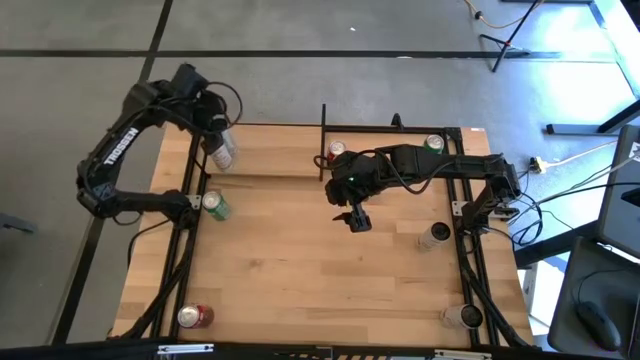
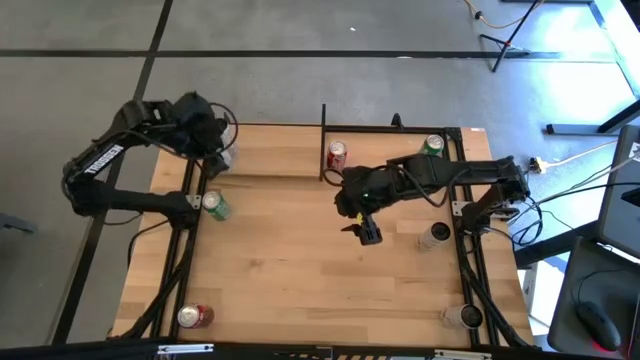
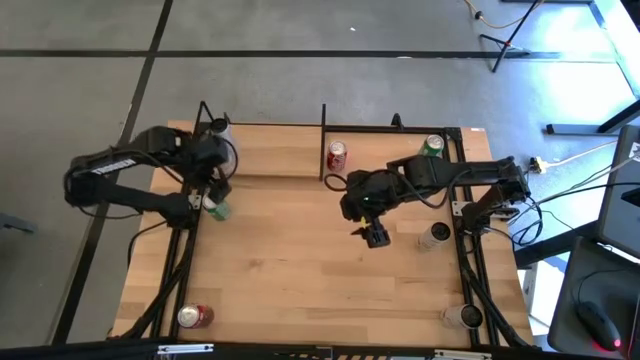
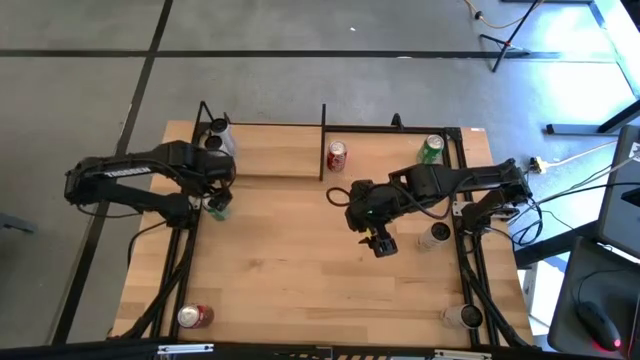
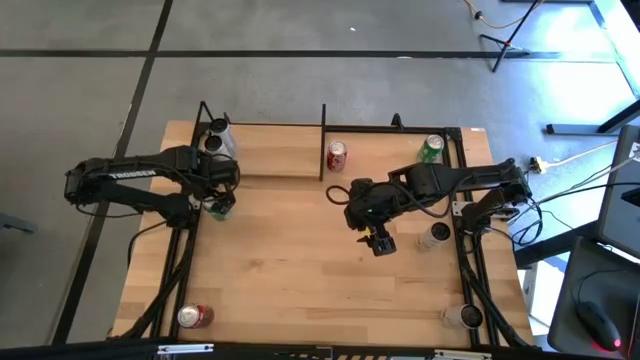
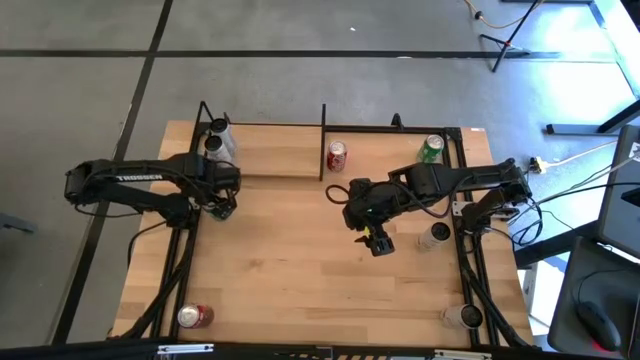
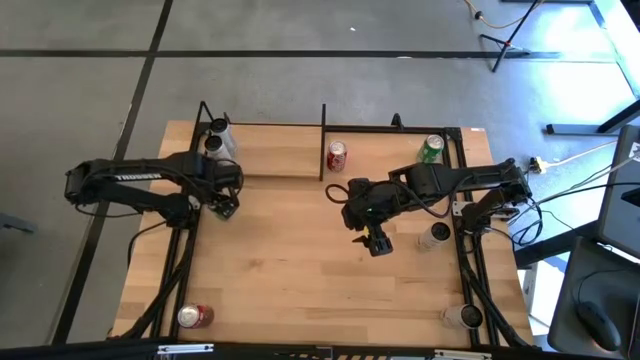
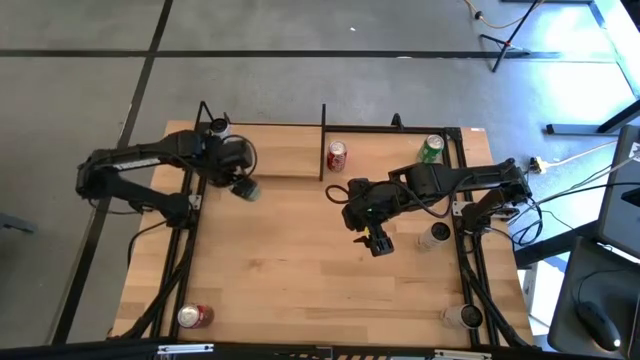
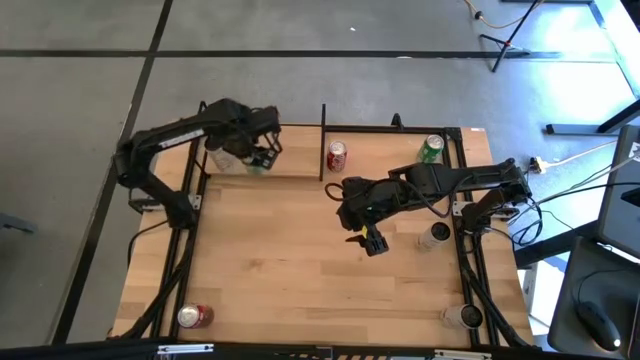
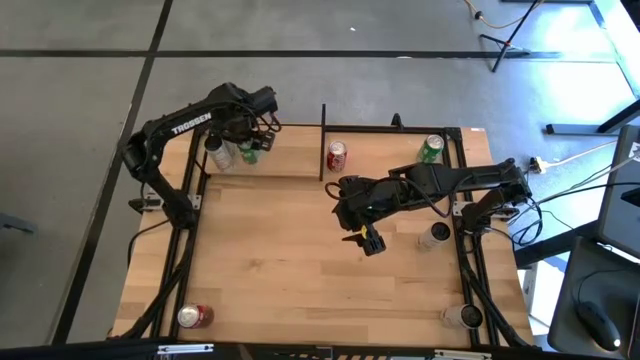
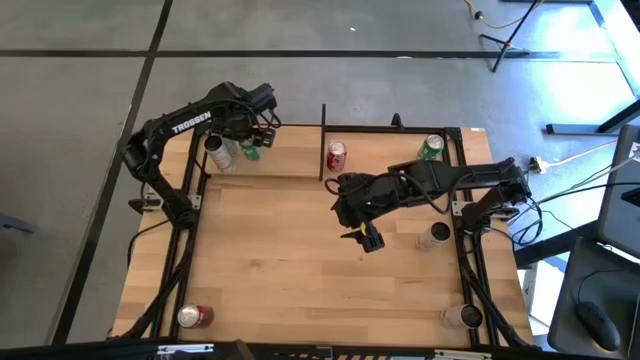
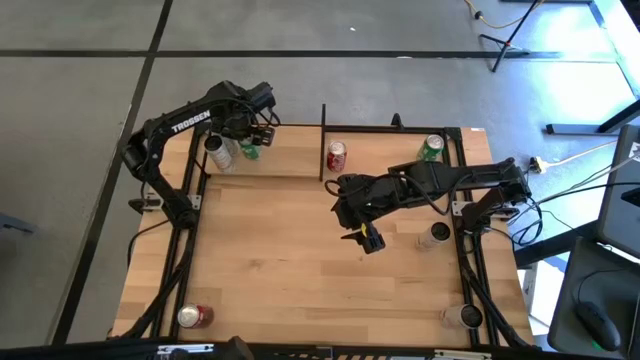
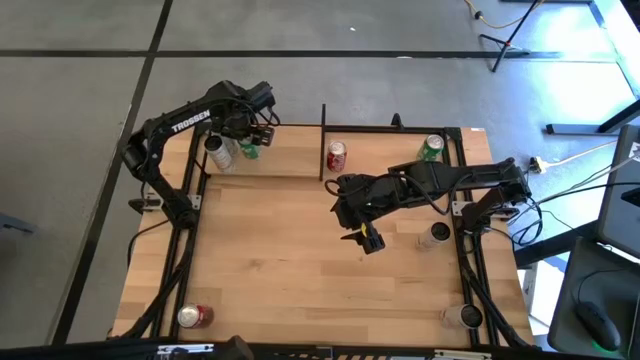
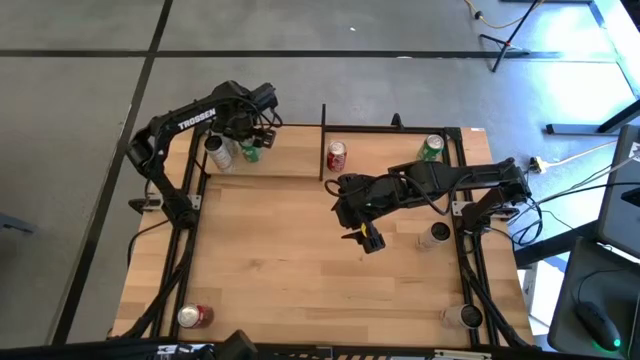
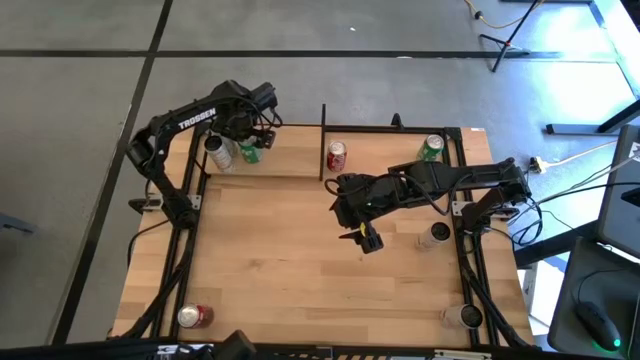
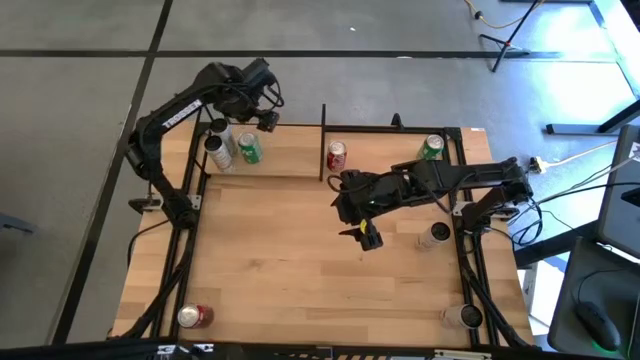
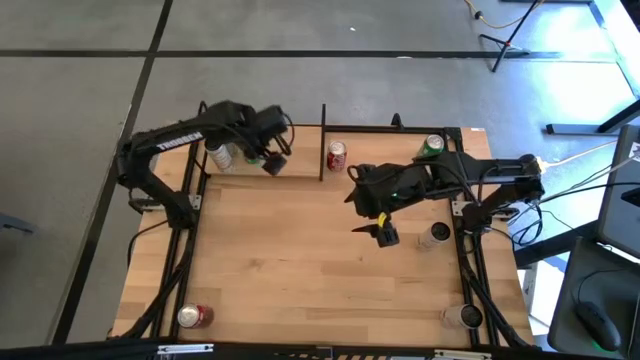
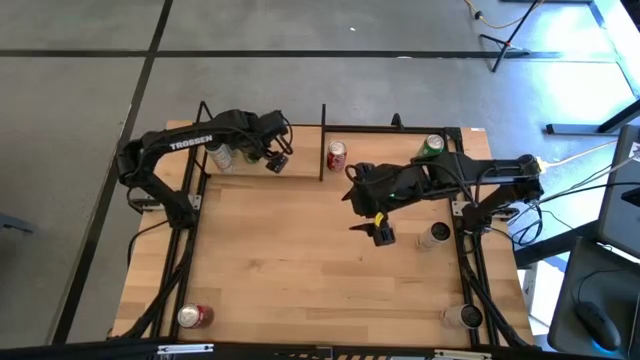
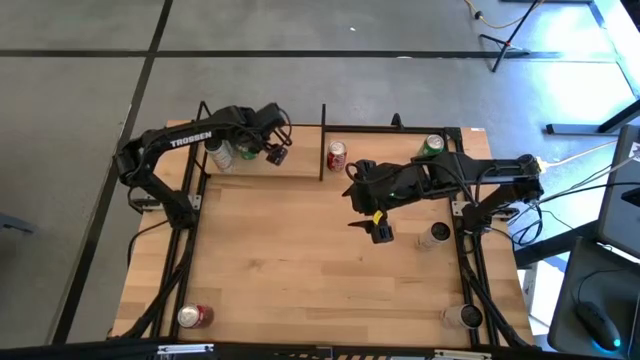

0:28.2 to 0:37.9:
Task: Place canned beverage on shelf
Put the left green soda can on the shelf

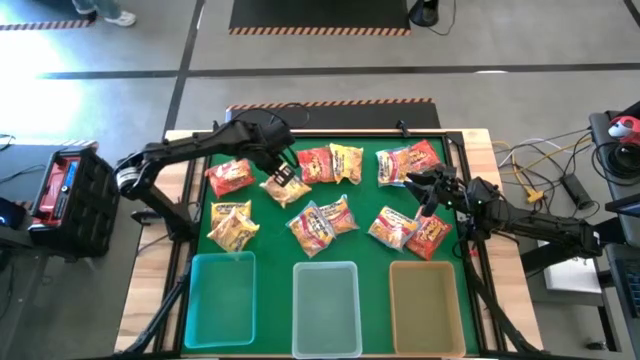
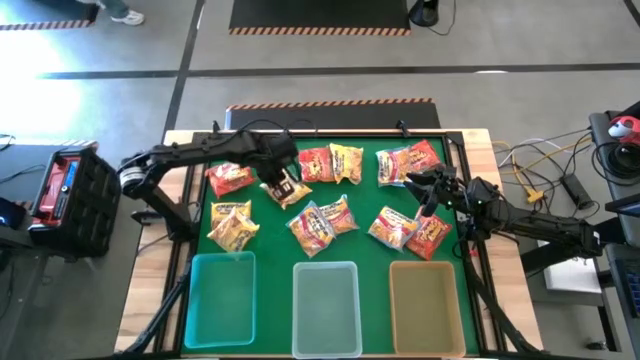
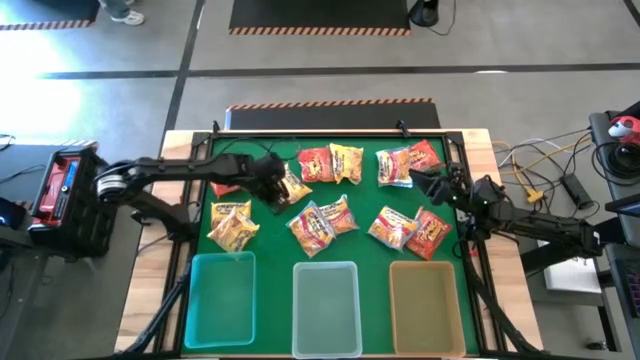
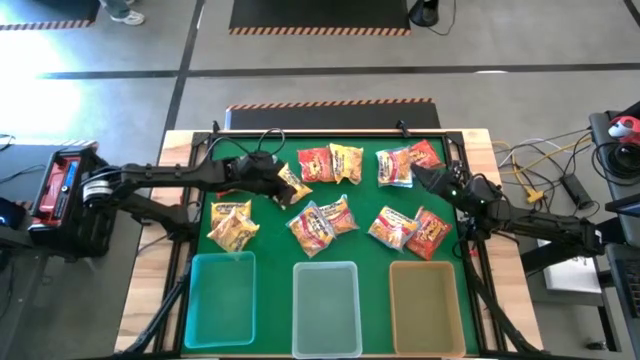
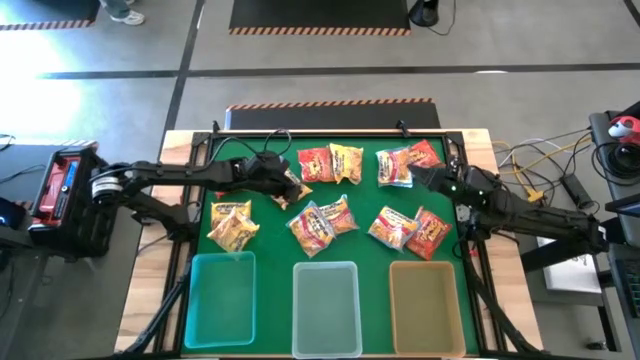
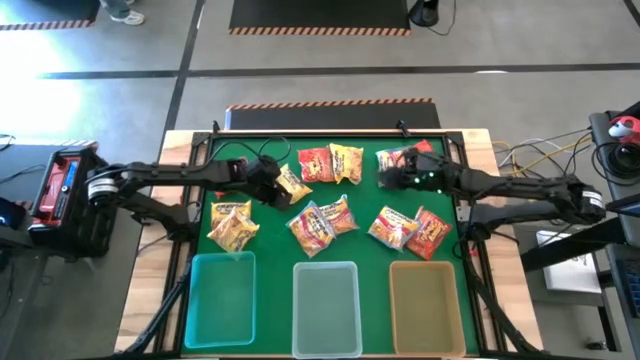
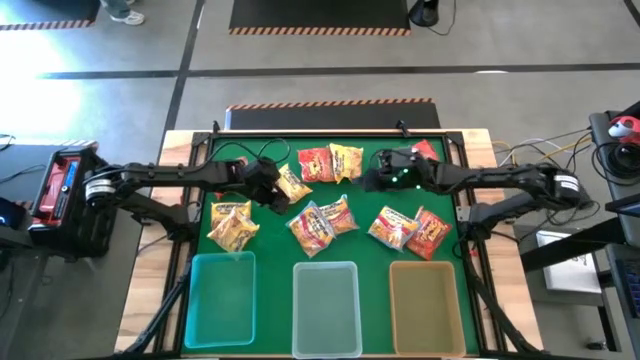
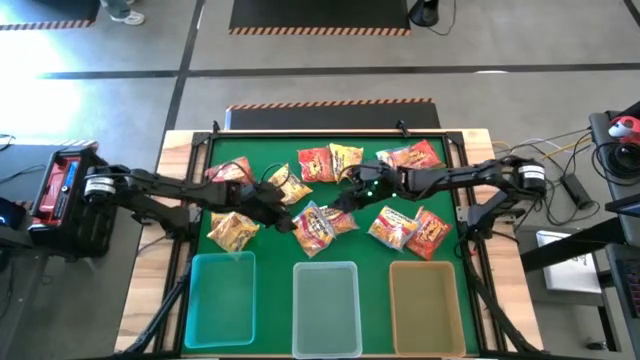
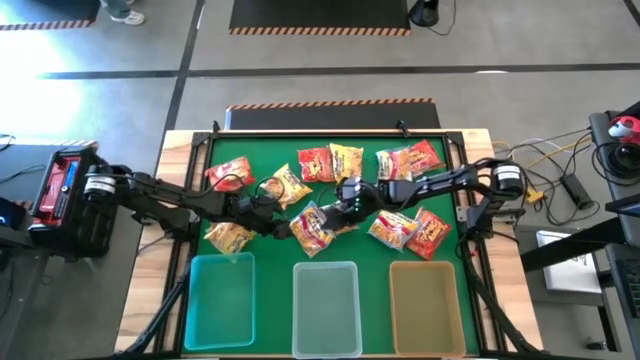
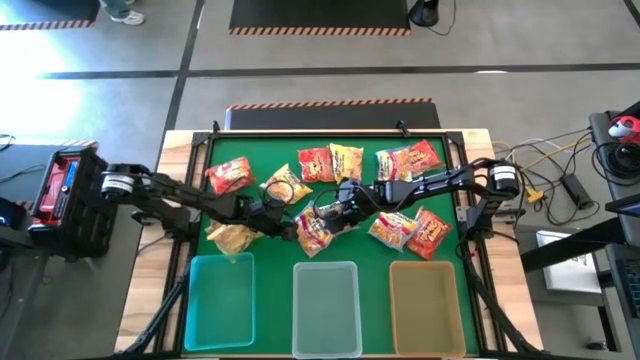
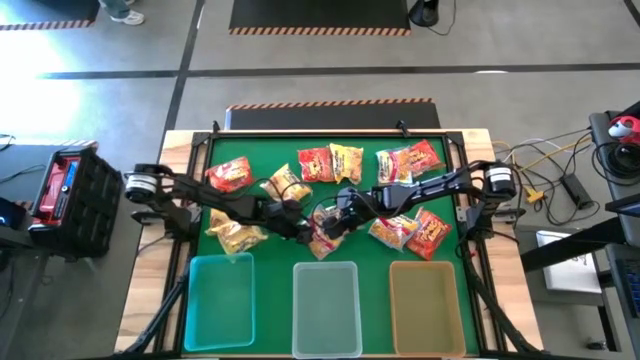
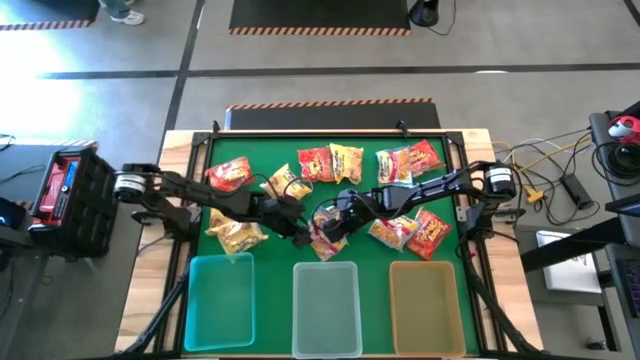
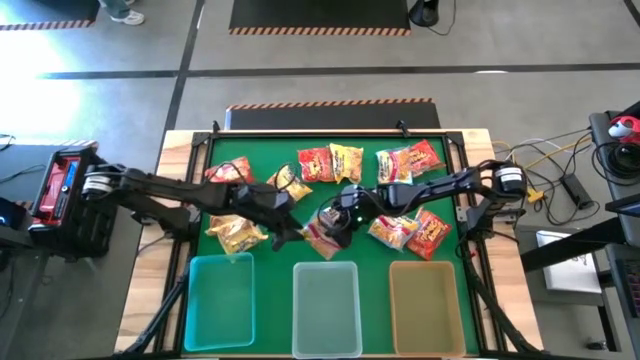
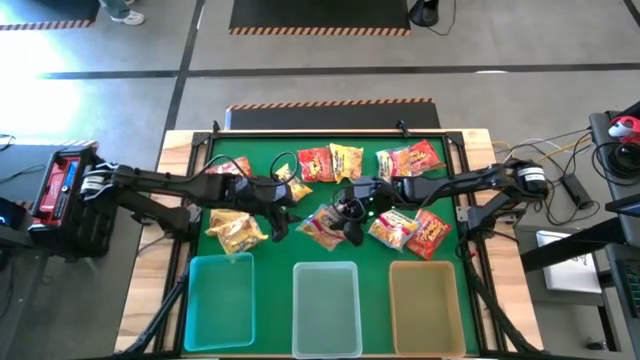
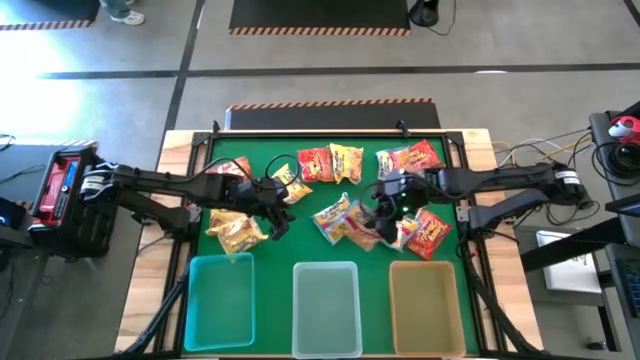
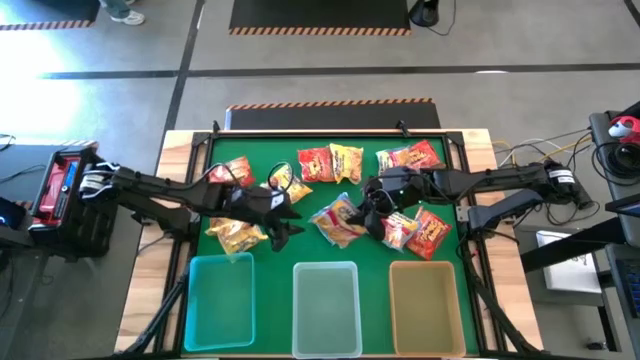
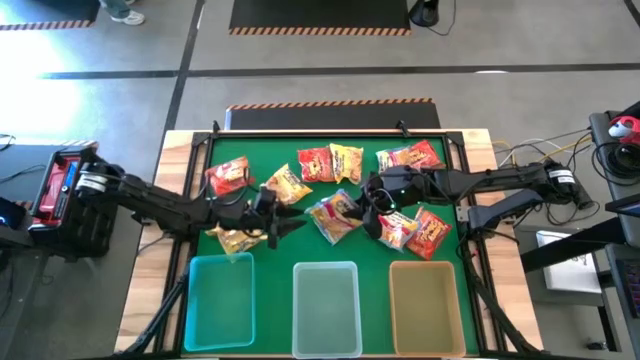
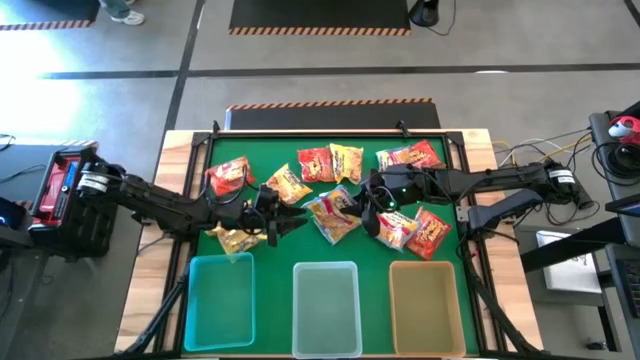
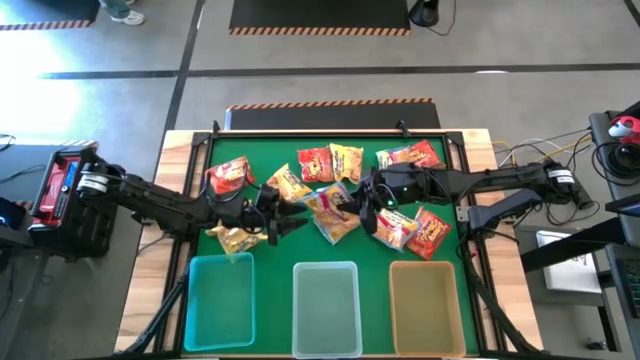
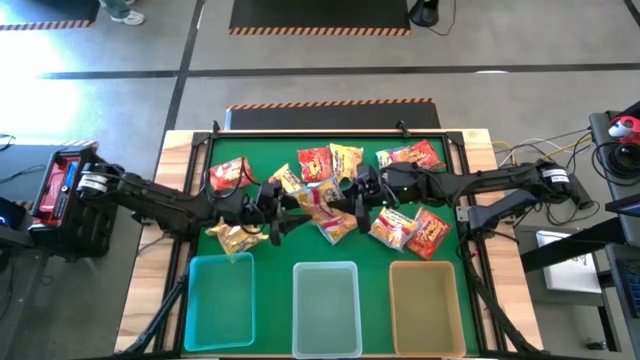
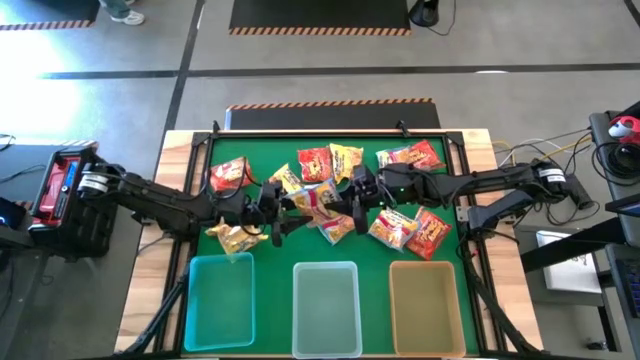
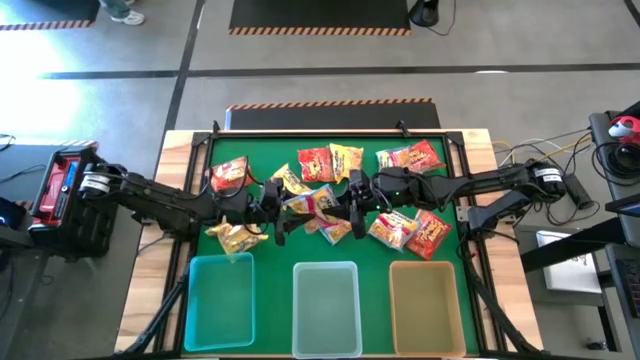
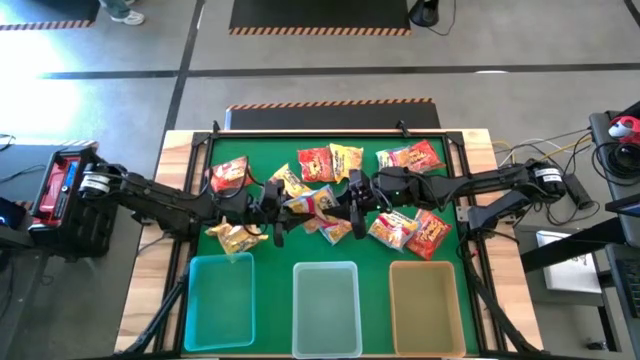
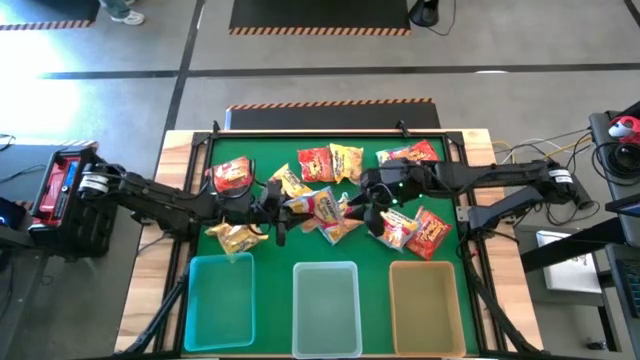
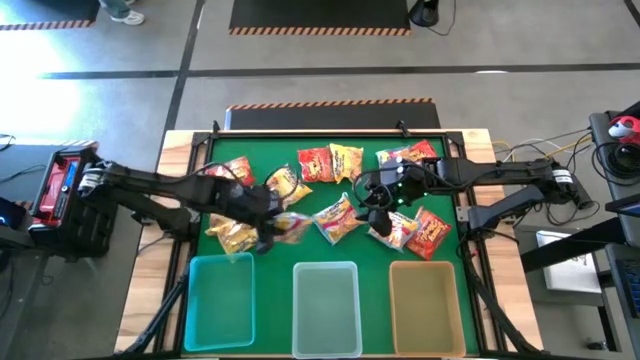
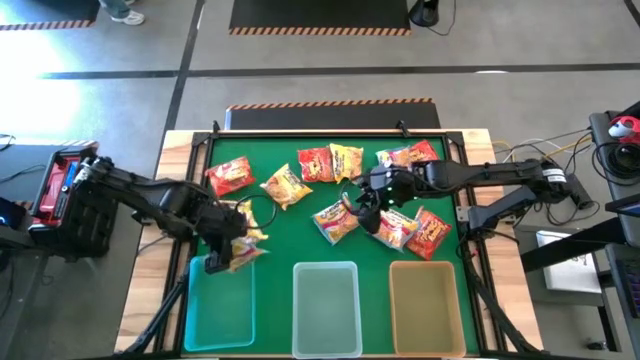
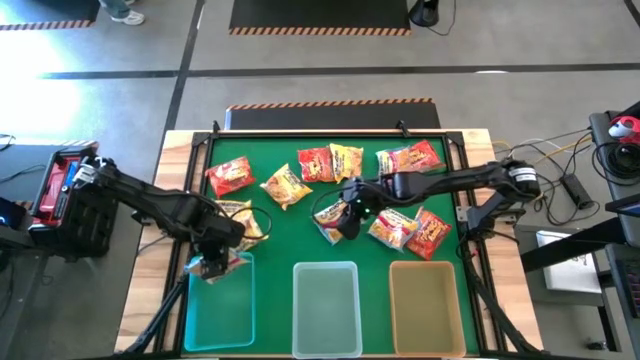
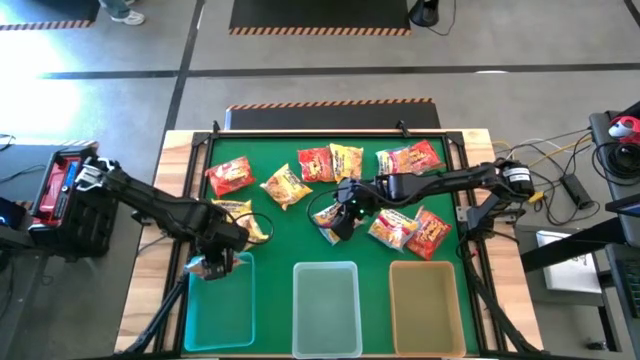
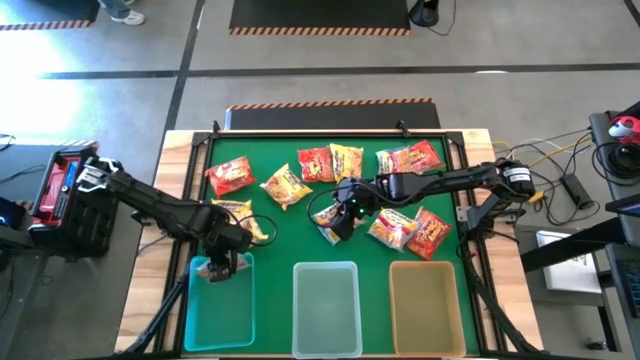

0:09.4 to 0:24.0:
Task: Sort Maruchan noodles
Put the blue noodle pack into the blue bin
